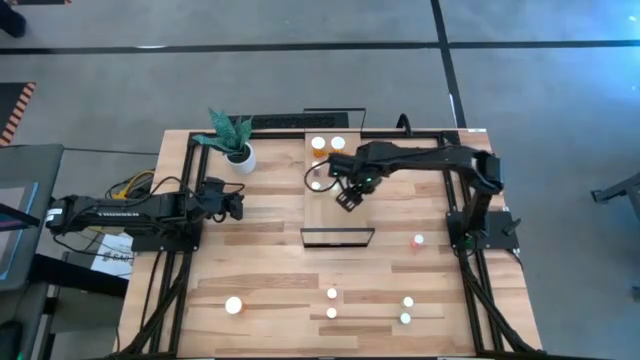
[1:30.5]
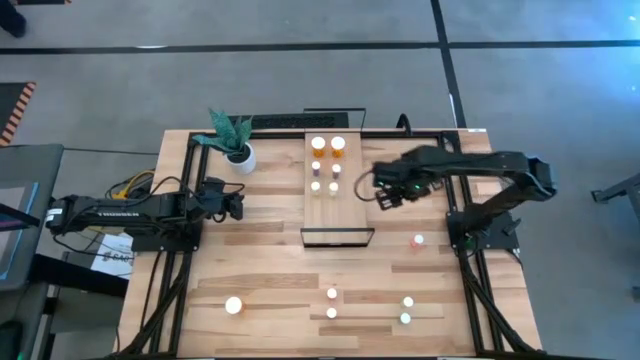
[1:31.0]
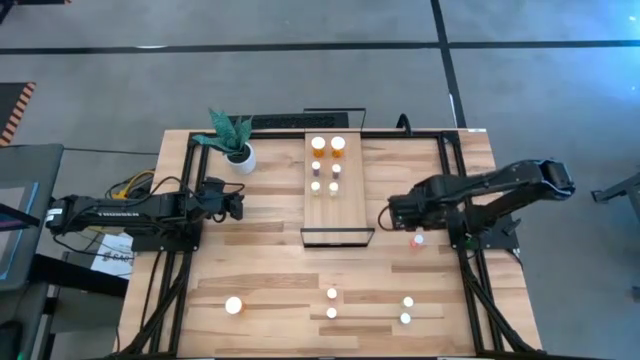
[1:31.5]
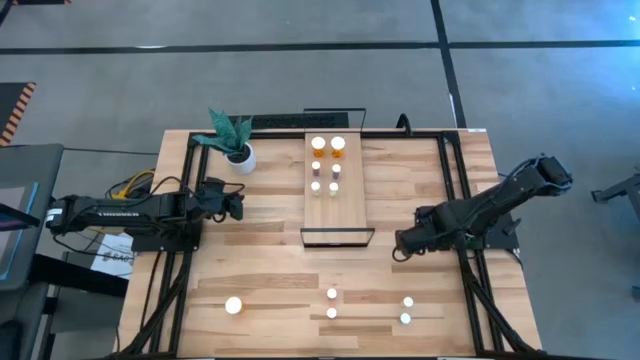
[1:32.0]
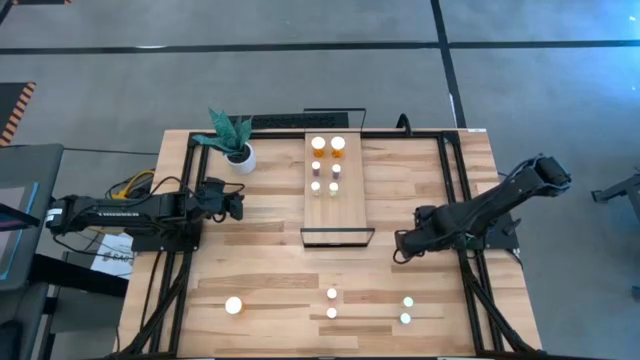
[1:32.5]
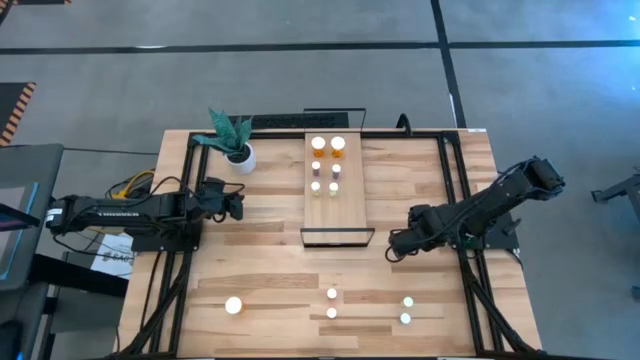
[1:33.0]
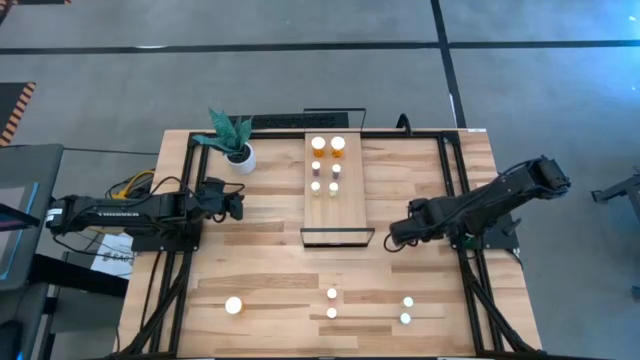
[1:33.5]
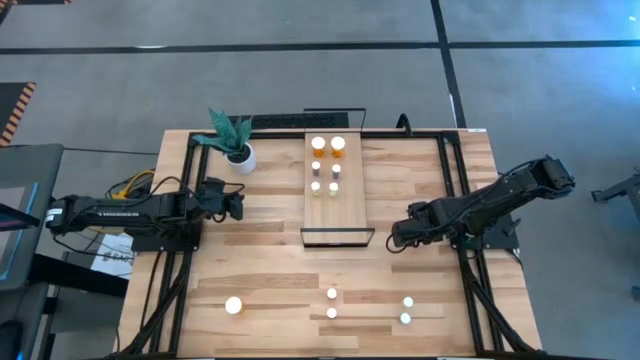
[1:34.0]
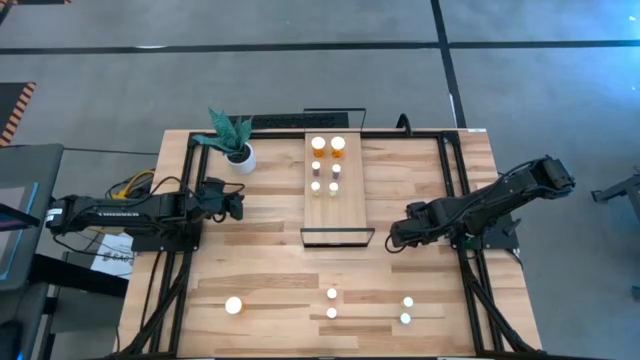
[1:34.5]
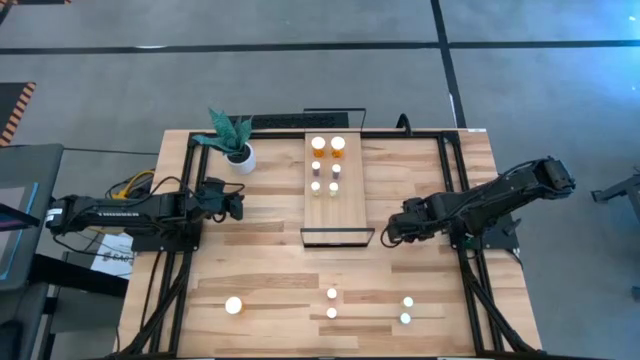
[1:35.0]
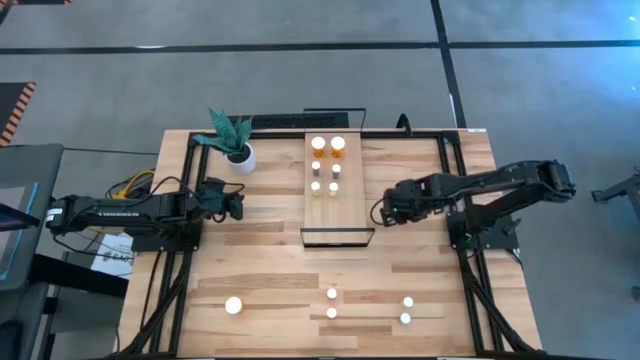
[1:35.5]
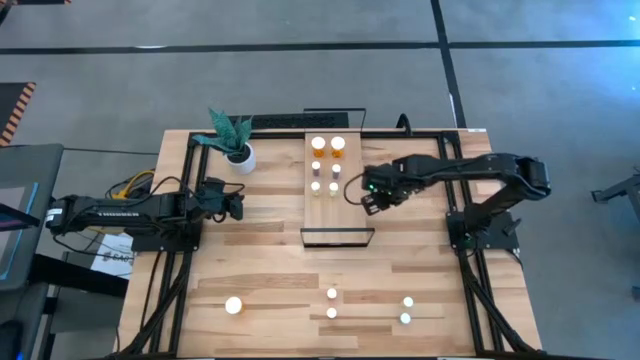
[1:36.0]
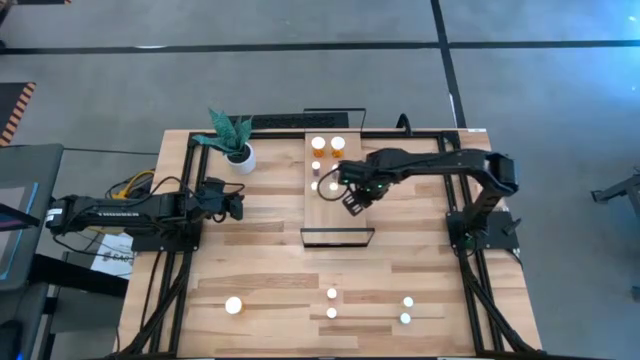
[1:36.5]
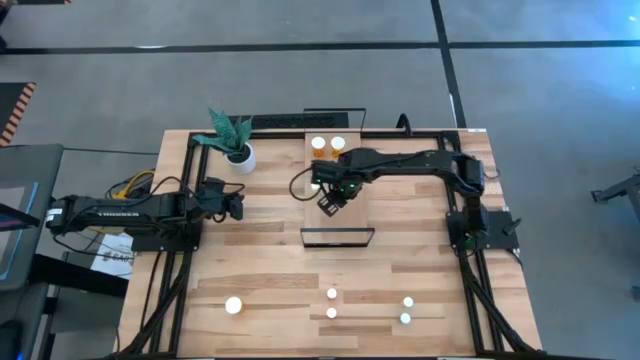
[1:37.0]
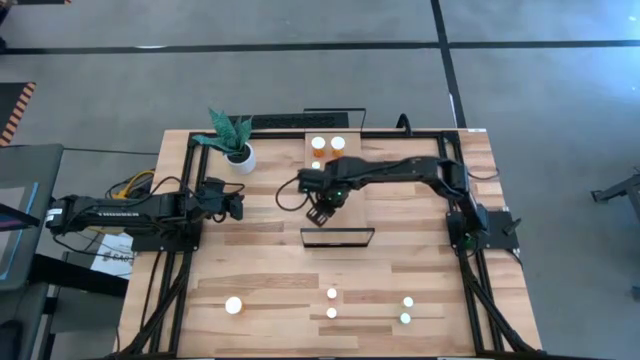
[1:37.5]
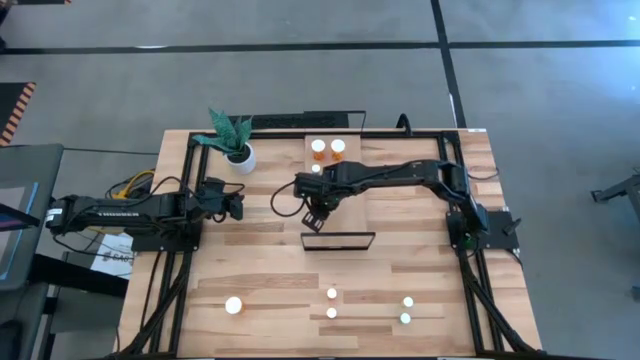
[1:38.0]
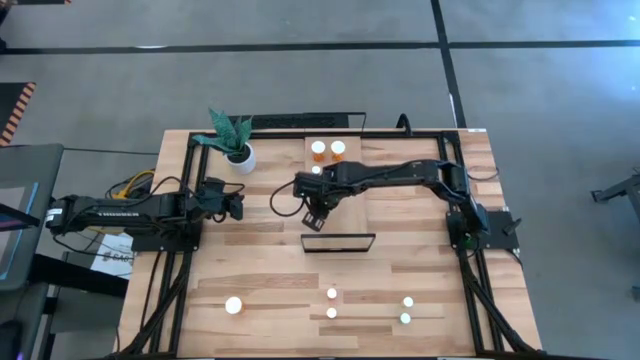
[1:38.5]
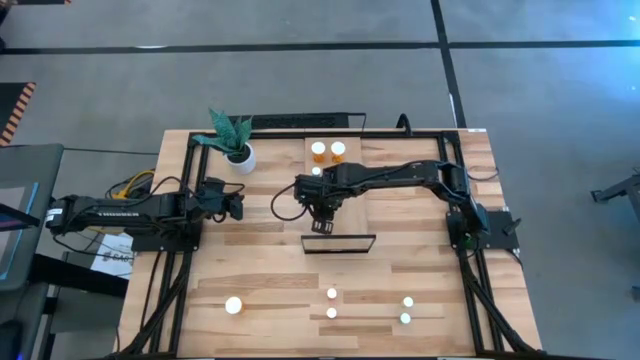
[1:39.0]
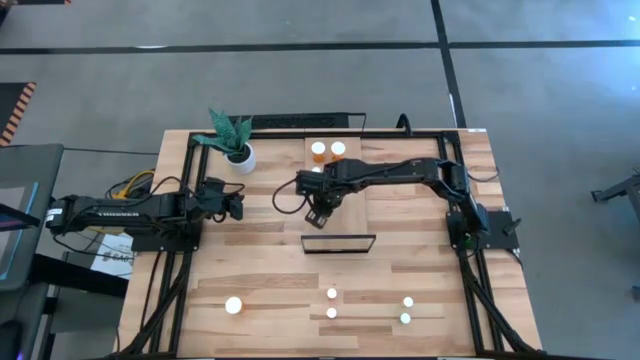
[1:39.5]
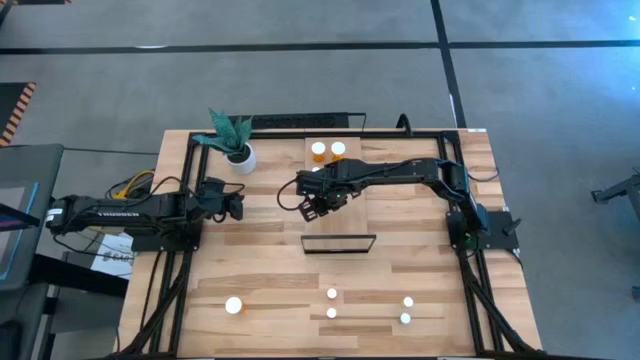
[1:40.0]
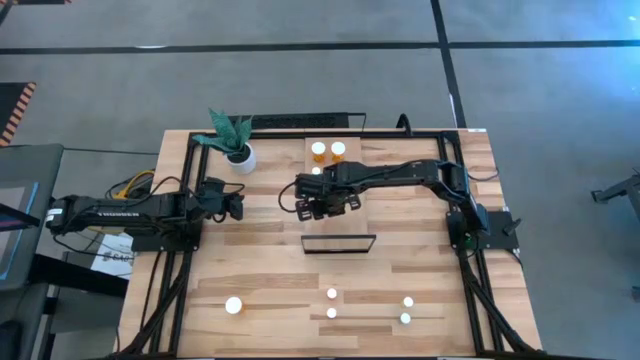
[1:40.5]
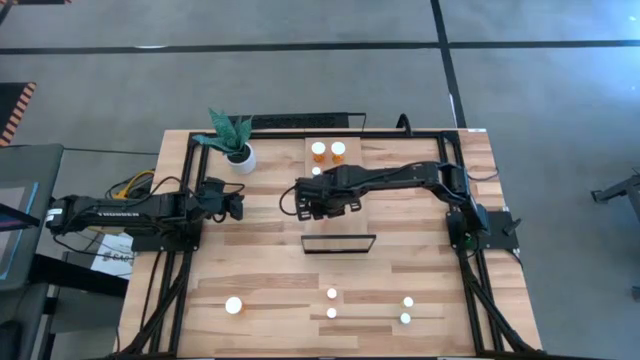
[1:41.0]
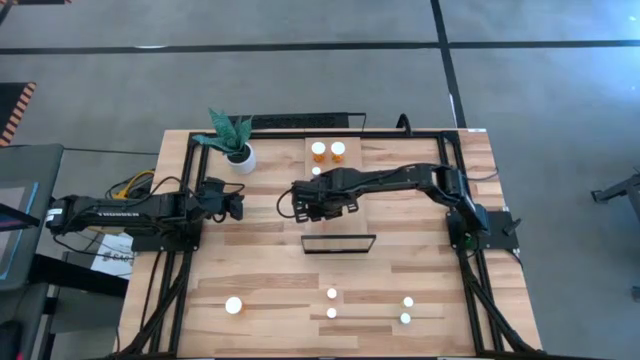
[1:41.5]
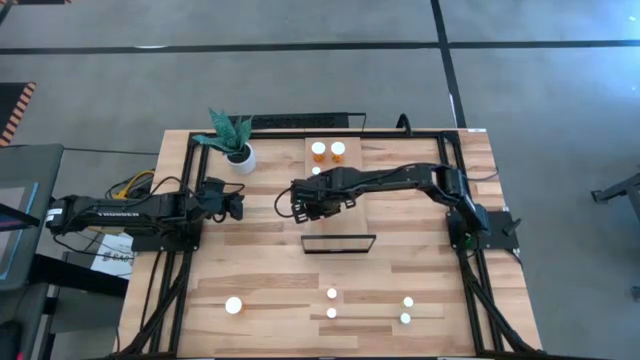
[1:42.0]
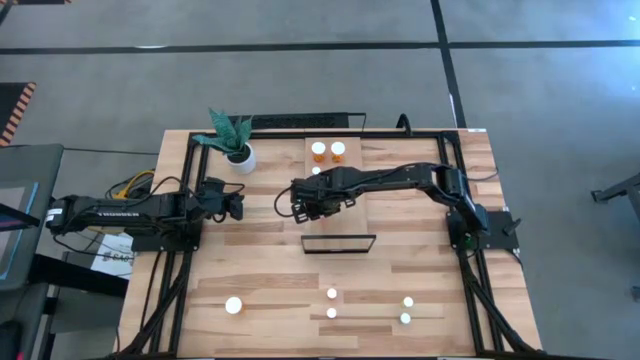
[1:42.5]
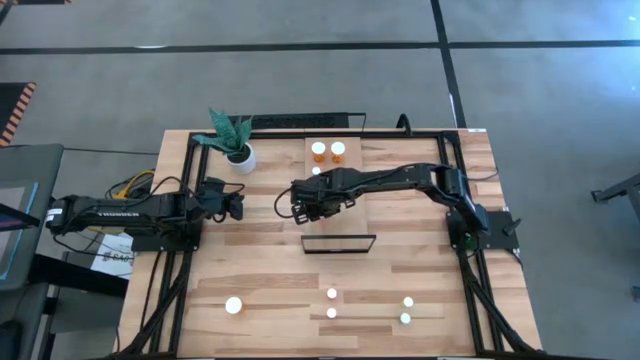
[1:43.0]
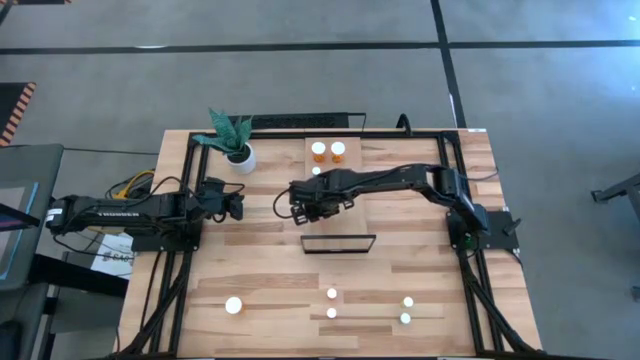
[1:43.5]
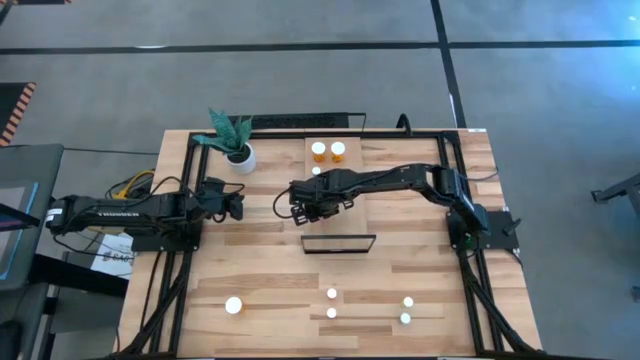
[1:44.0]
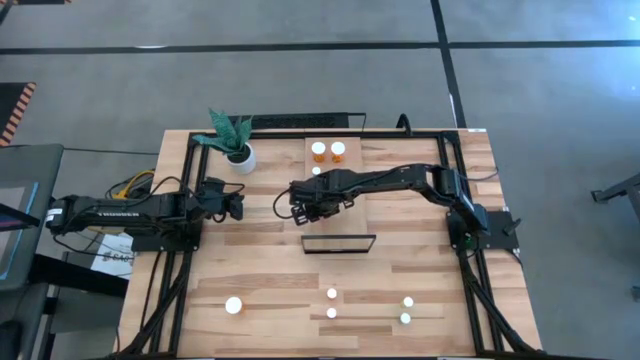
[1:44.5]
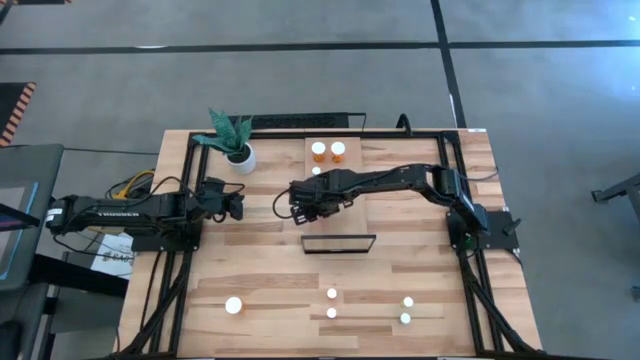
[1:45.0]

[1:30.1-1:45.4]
Task: Pick and place medicine bottles onto shelf by color
Put the top pink pill bottle on the shelf

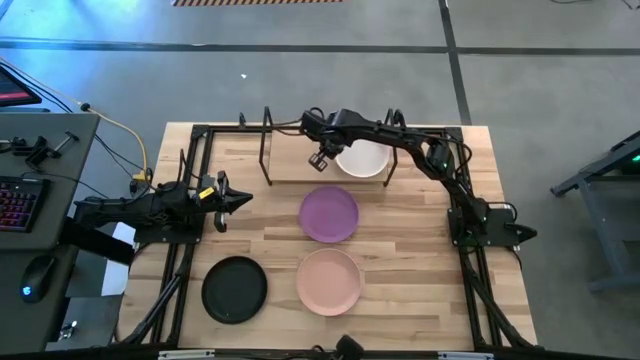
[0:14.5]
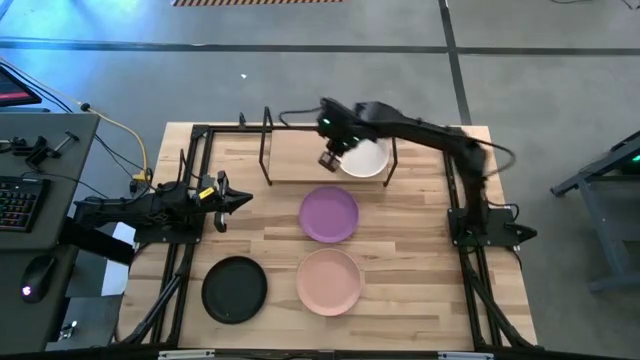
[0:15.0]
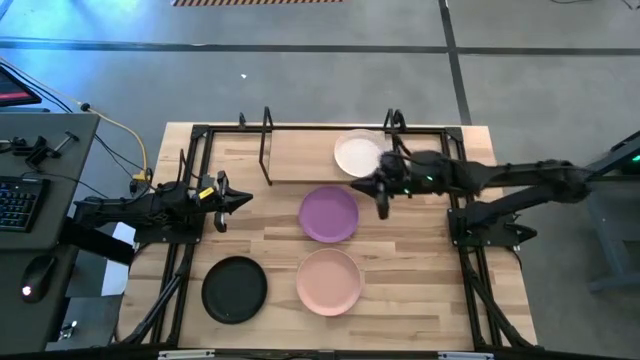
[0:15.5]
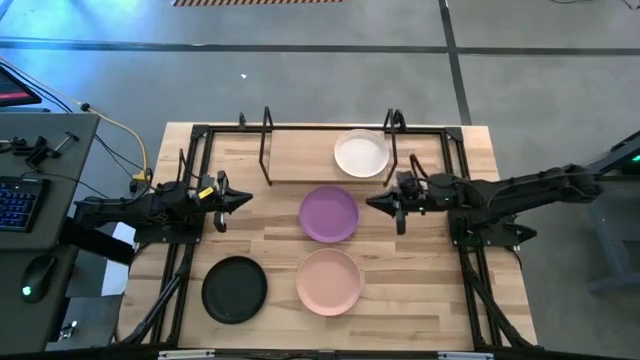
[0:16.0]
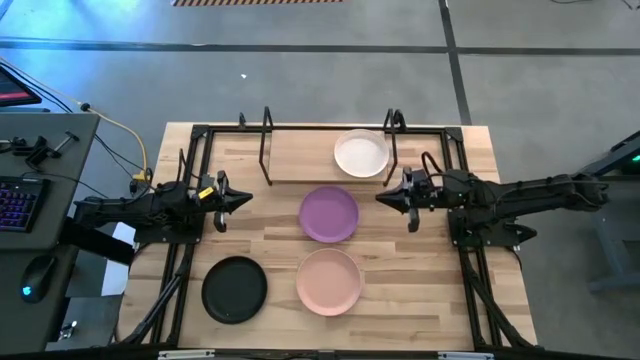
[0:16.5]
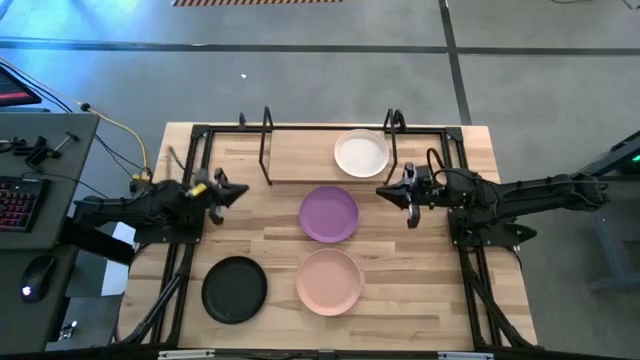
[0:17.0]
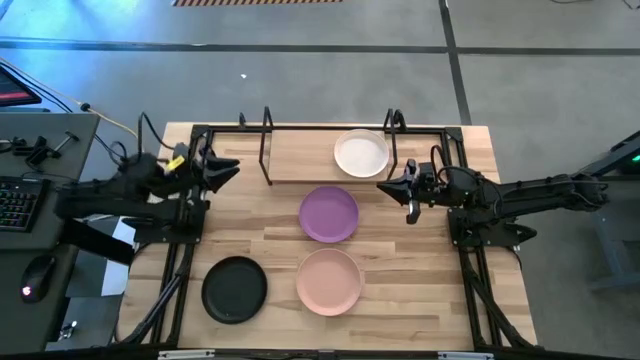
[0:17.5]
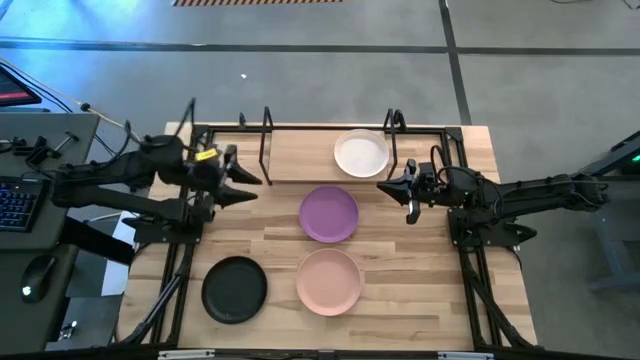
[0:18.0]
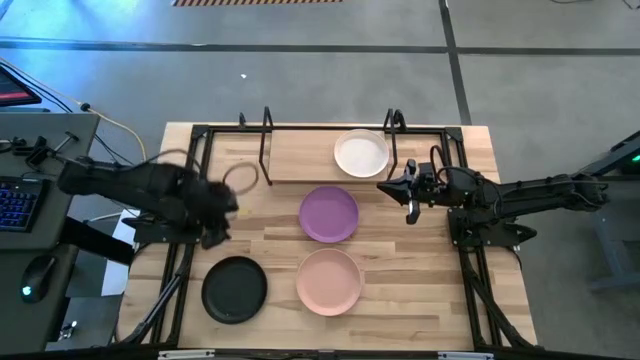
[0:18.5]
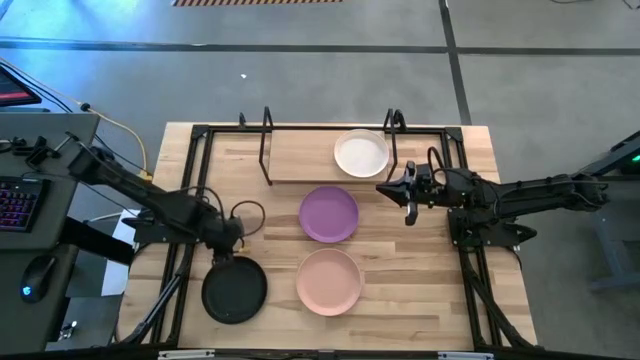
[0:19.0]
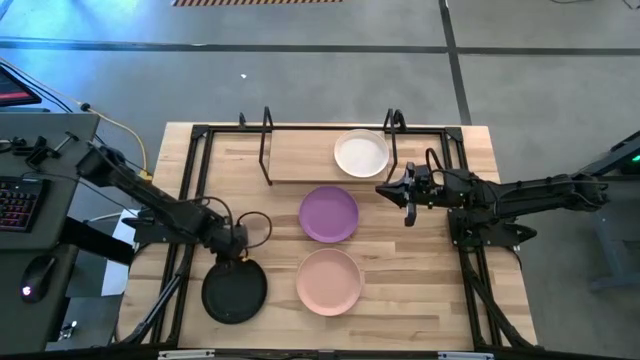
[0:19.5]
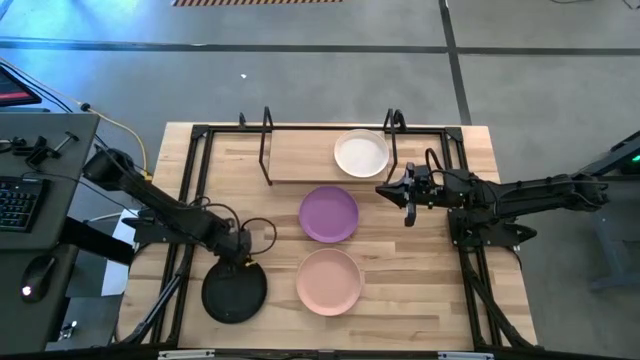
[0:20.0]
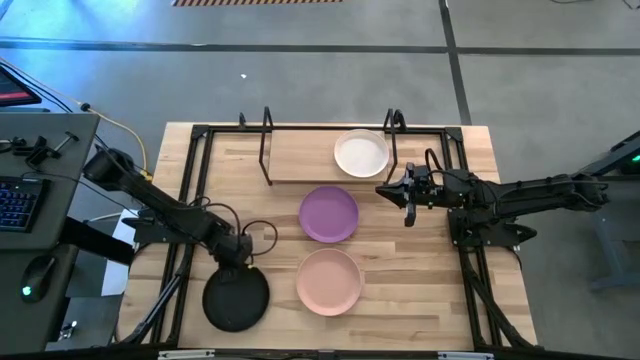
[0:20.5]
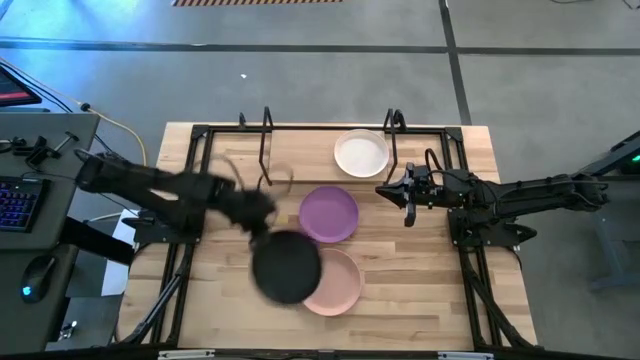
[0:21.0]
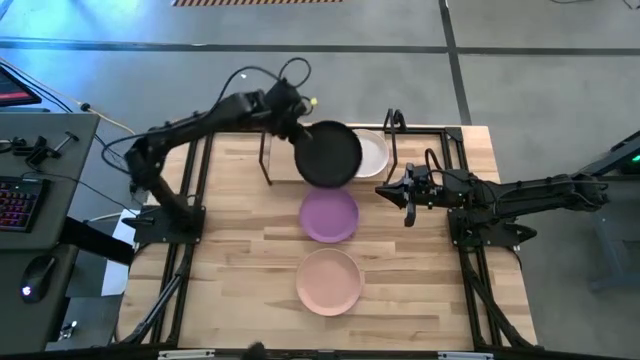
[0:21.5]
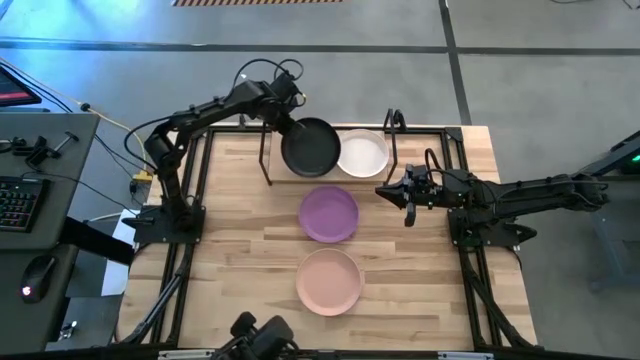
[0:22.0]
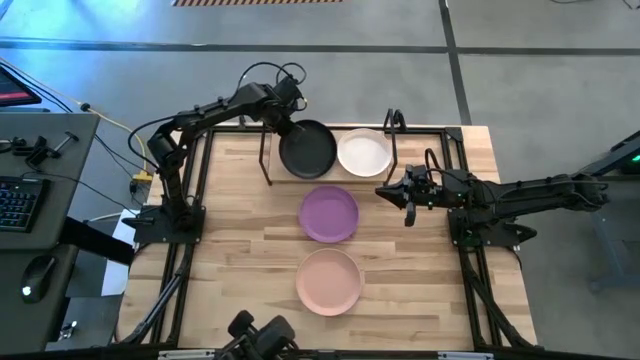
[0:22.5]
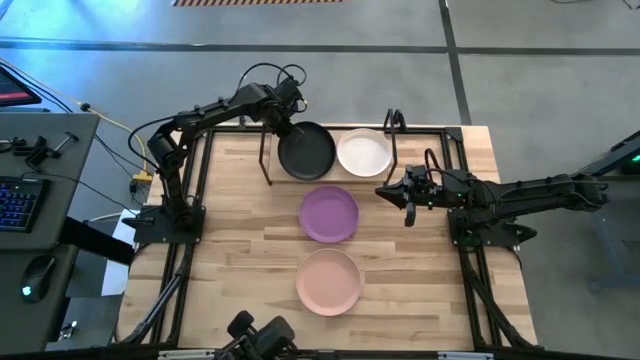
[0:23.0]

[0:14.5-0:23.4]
Task: Place and stack plates onto a shelf
Put the black plate on the shelf
